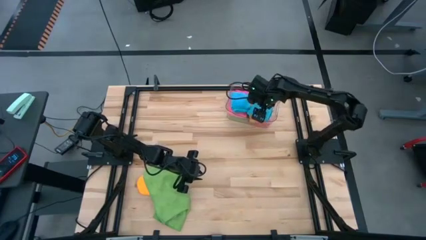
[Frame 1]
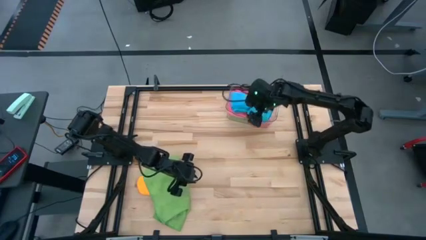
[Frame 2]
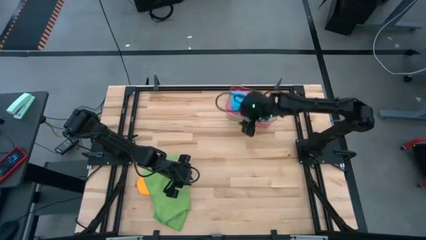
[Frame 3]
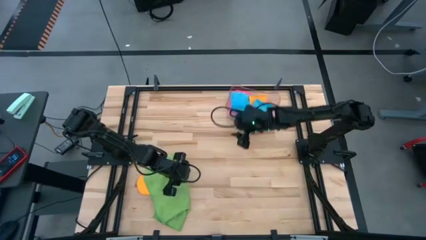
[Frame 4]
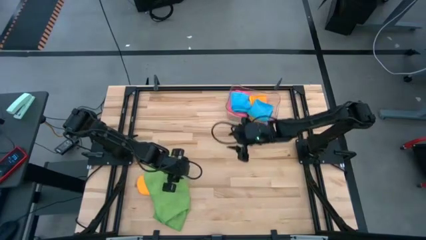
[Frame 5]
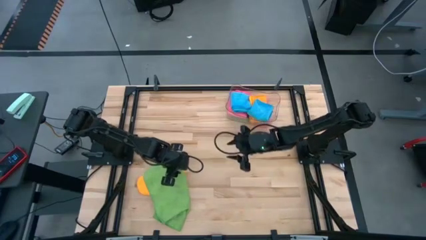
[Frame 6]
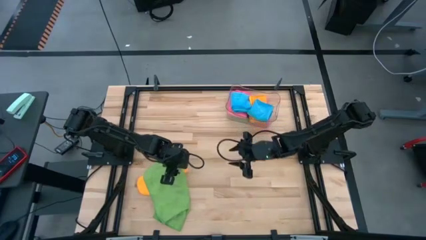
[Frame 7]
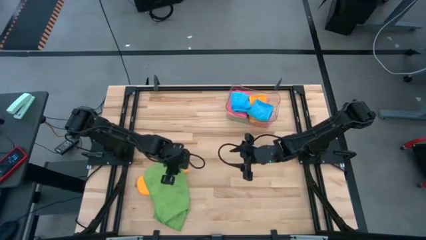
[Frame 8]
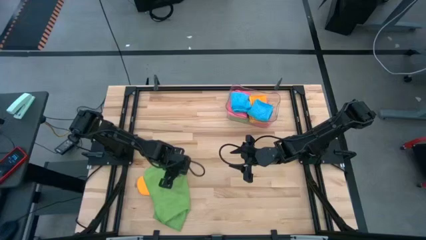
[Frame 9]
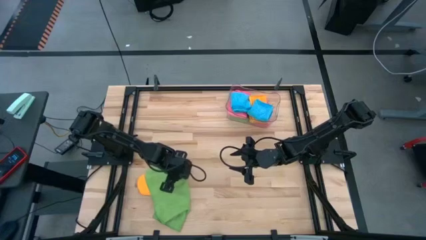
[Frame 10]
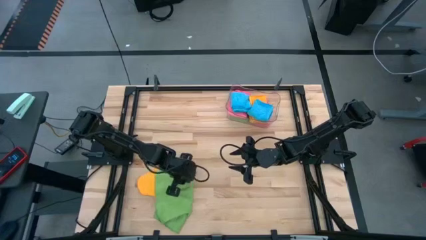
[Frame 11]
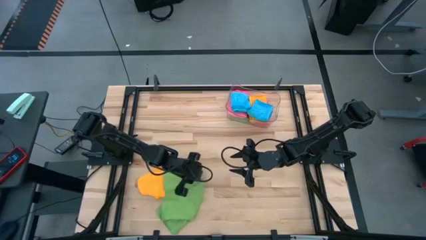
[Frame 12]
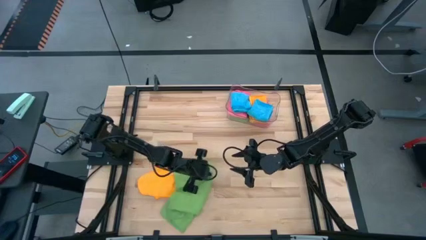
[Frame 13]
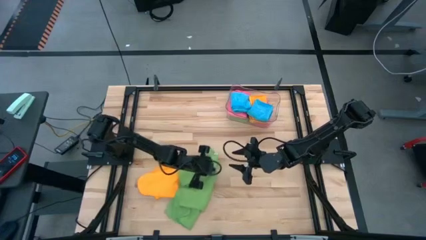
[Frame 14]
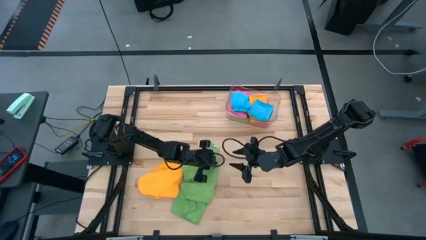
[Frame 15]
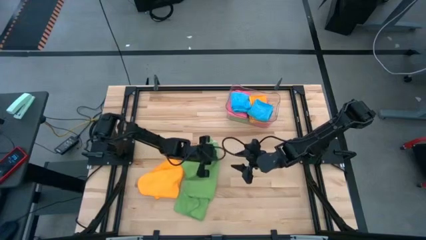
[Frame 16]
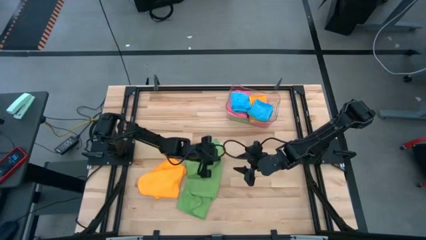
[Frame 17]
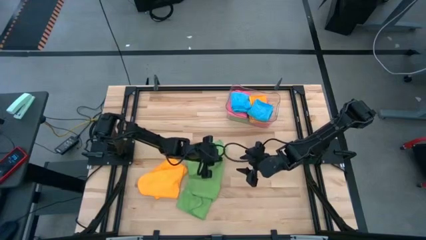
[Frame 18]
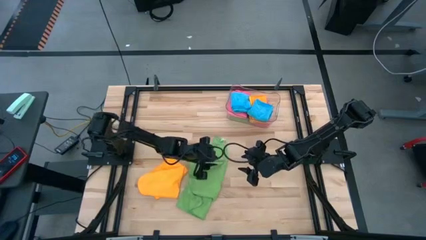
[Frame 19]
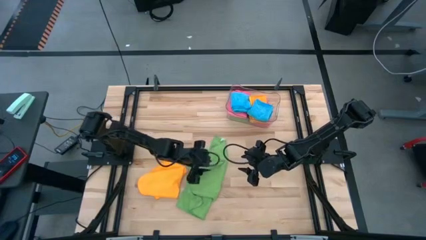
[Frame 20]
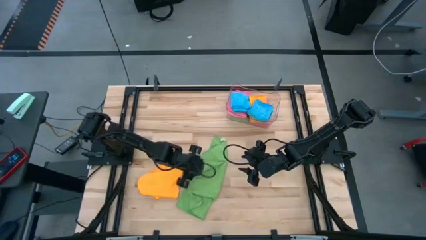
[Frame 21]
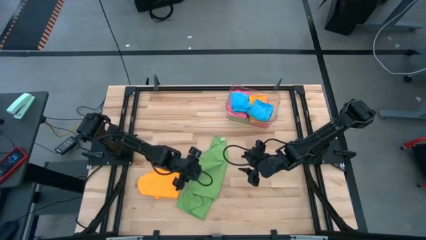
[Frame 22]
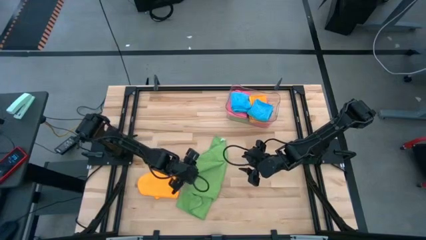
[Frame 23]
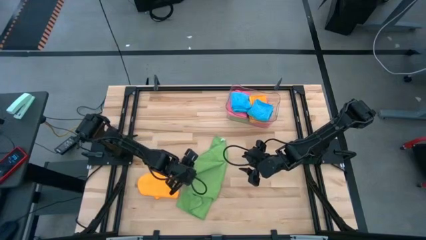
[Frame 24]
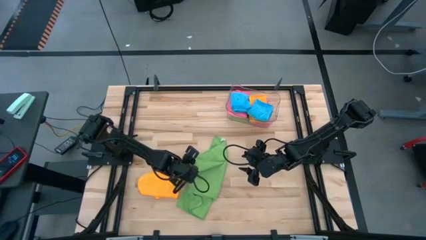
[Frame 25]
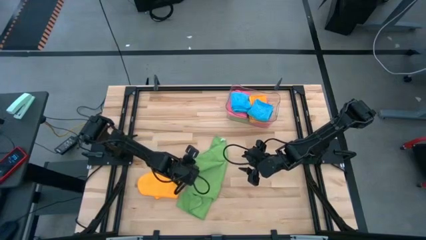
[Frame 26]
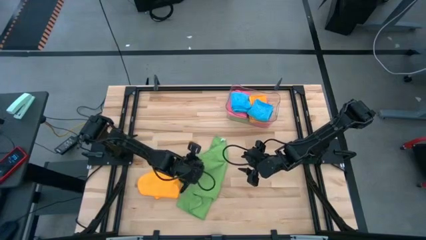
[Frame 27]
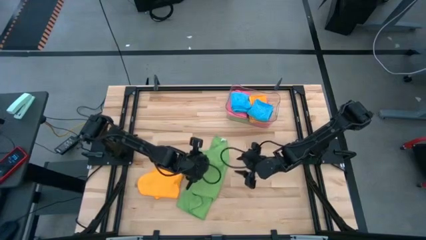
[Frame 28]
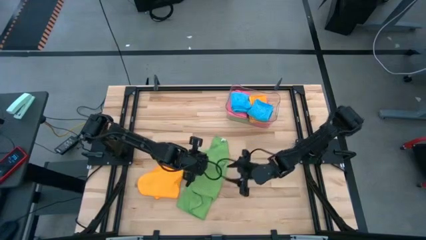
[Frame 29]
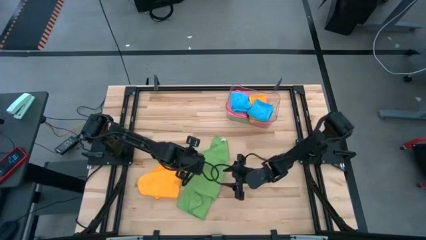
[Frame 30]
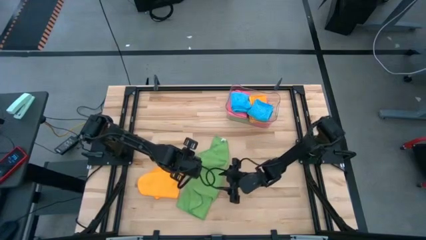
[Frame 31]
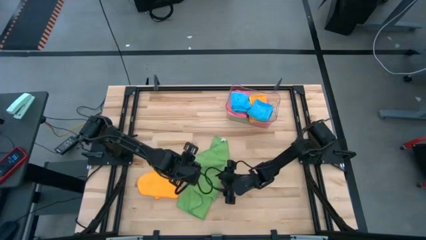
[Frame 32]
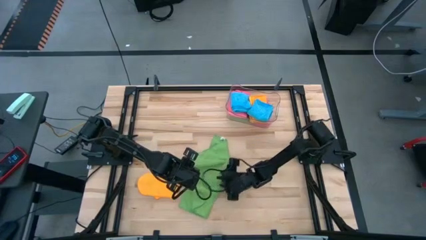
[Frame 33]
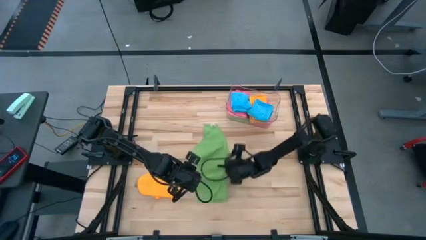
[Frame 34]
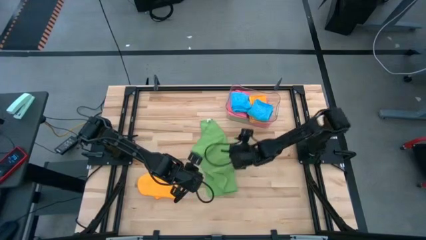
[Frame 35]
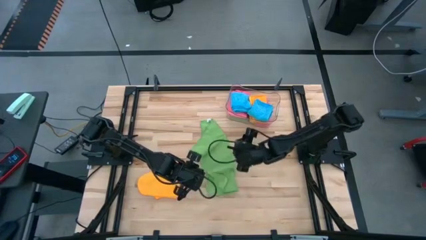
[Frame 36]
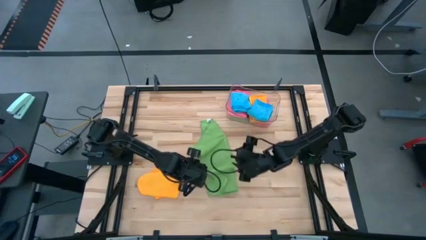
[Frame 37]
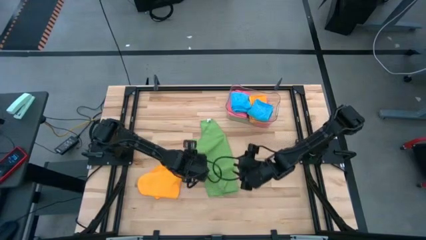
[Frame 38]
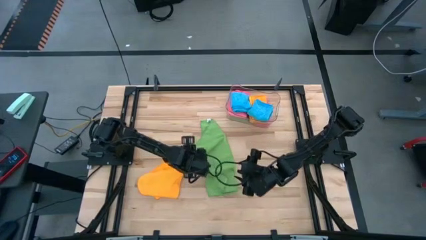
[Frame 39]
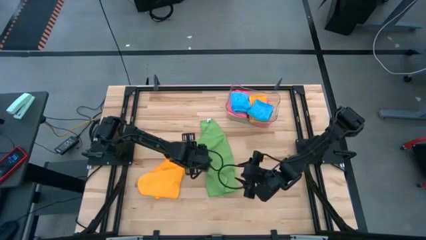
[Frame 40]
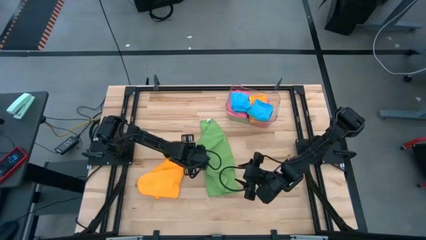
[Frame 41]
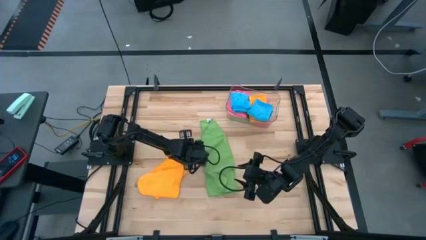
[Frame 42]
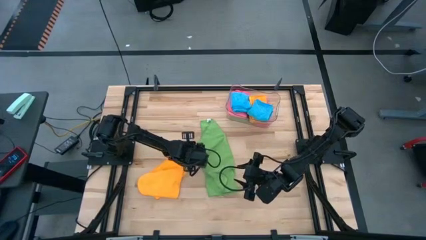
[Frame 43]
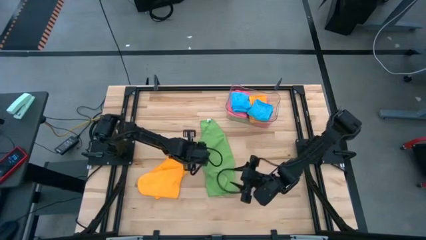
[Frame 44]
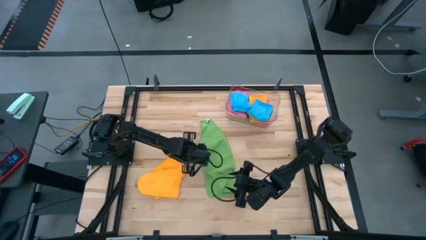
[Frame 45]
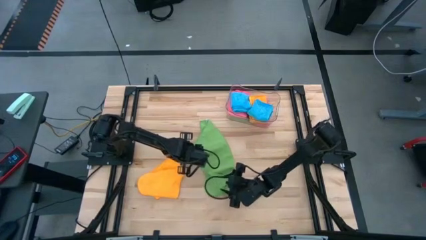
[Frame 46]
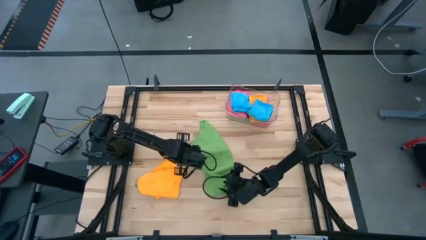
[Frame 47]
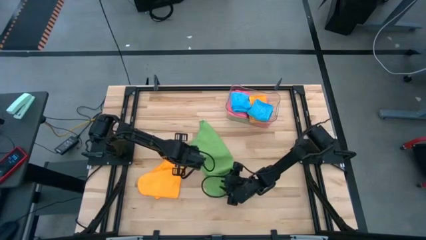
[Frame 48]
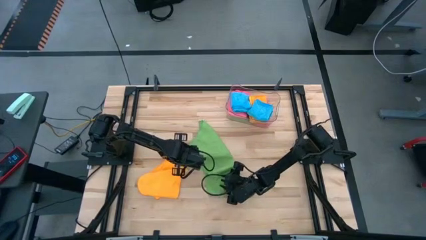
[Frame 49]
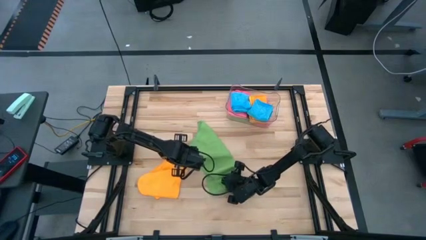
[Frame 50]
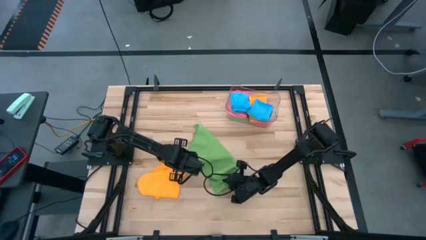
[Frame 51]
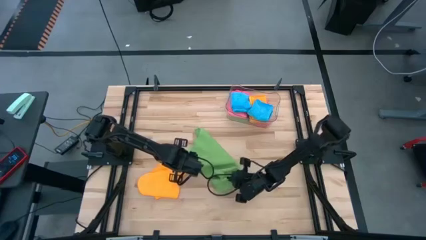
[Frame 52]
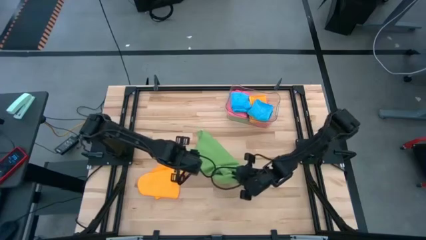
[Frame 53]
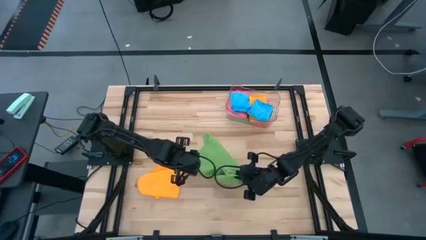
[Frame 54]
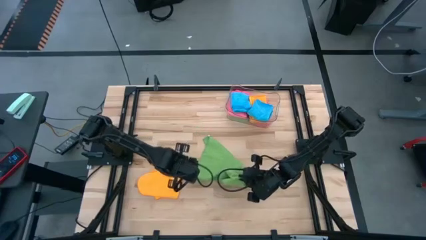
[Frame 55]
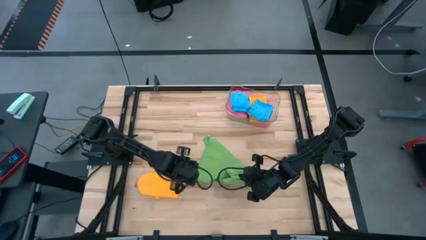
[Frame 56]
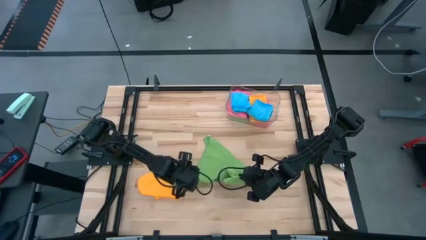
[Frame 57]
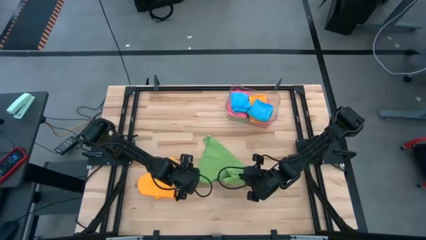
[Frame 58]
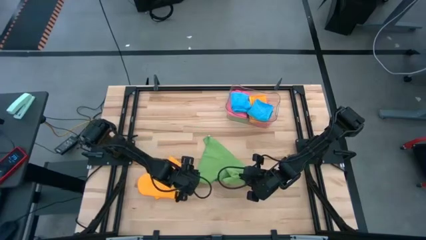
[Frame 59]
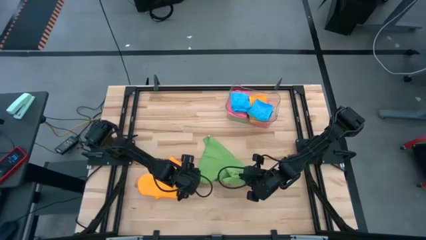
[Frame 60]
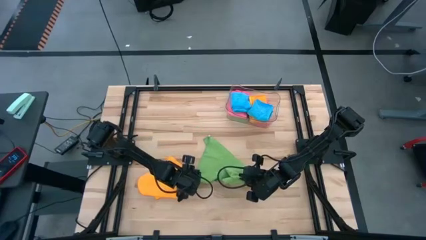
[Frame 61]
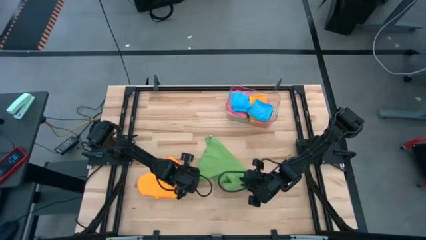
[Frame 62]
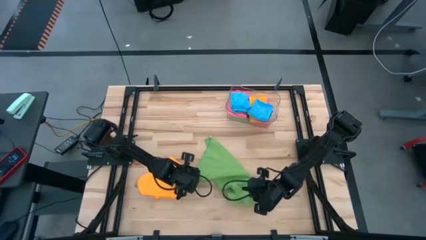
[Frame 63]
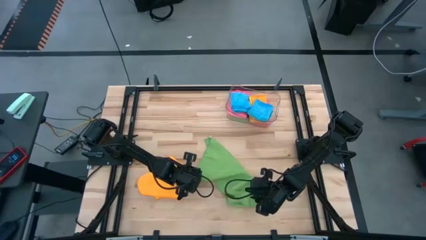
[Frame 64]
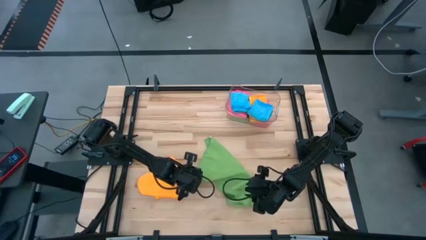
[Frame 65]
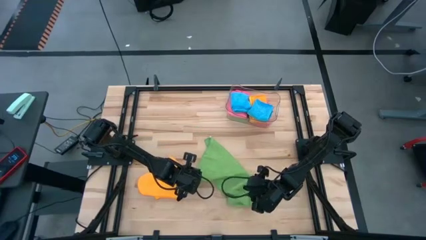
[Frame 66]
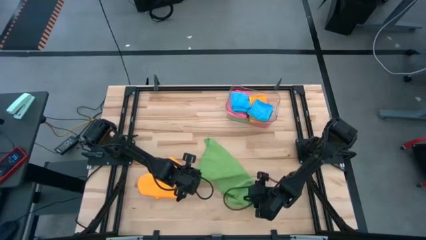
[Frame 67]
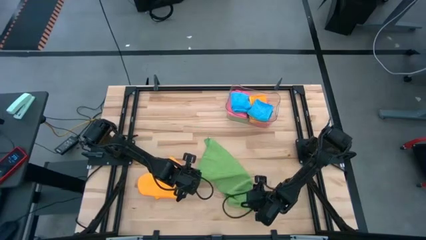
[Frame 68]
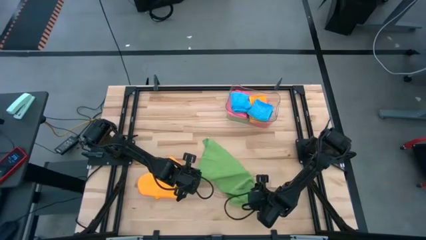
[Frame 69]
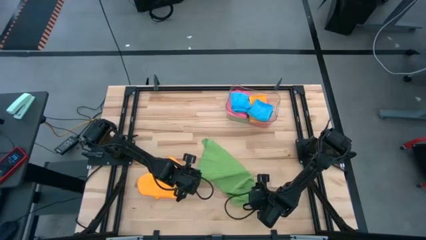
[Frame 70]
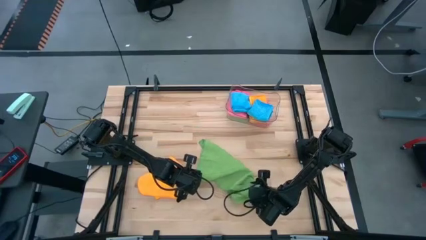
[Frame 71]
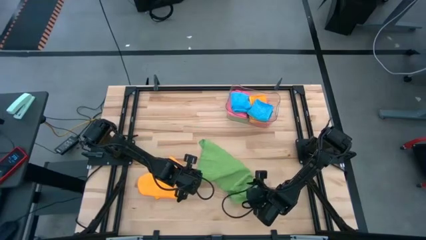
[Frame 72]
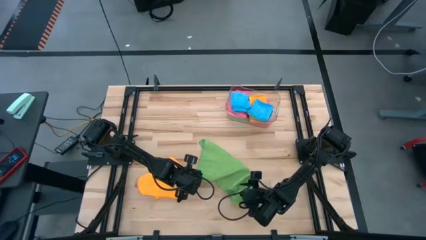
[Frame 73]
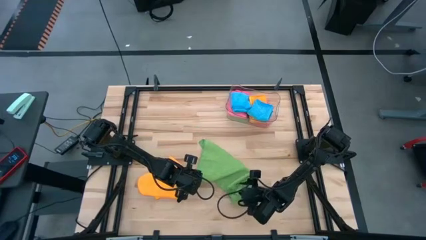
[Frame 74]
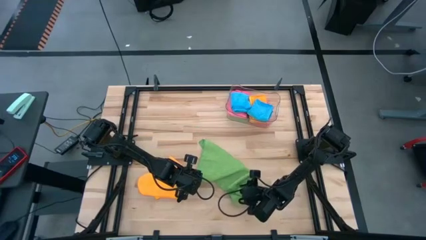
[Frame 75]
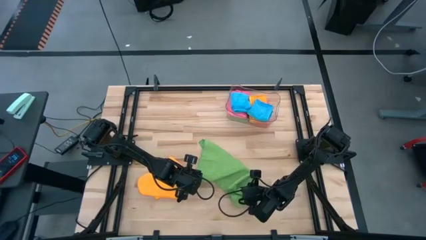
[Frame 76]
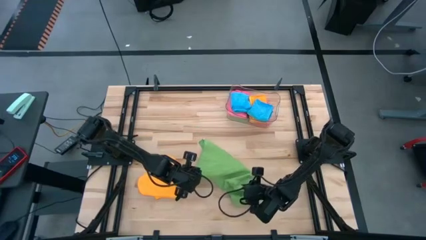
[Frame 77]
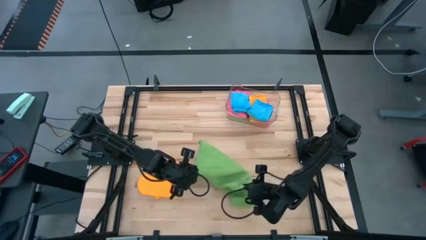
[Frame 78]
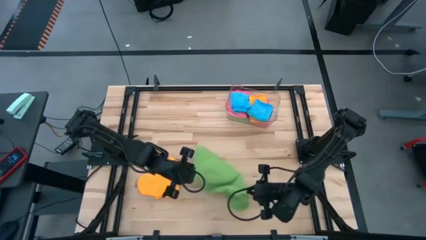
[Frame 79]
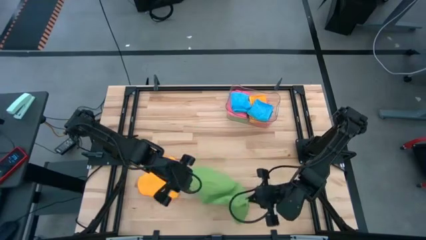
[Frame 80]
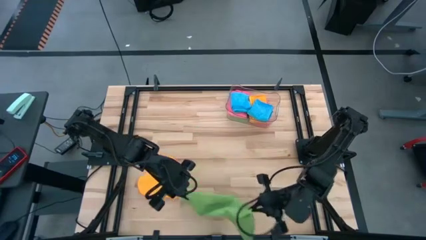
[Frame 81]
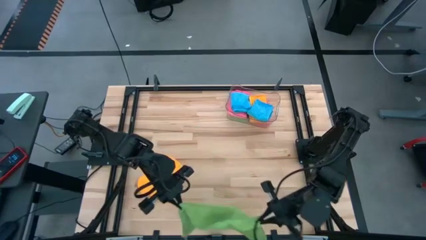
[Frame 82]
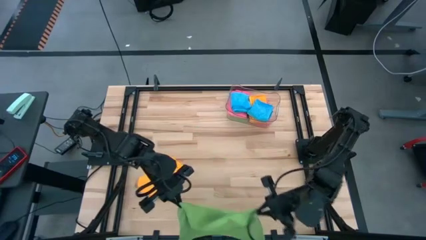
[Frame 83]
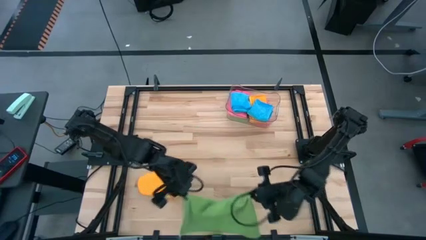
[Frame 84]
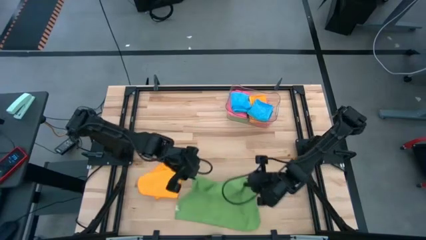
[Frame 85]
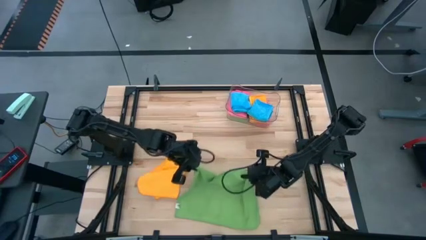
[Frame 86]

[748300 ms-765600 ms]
Task: Fold microfiber towels
Fold the green towel
